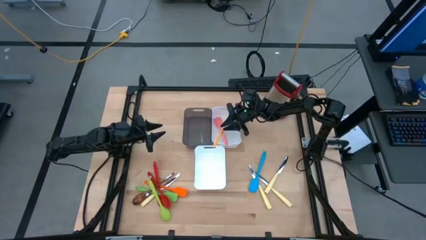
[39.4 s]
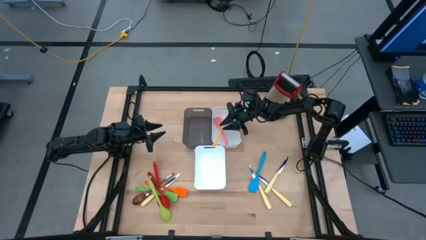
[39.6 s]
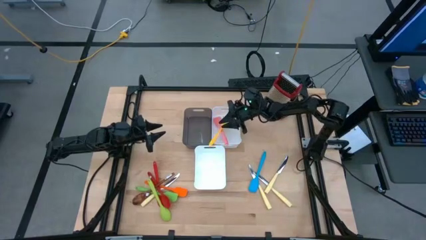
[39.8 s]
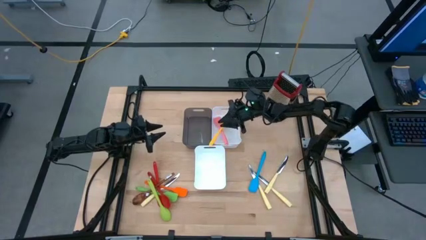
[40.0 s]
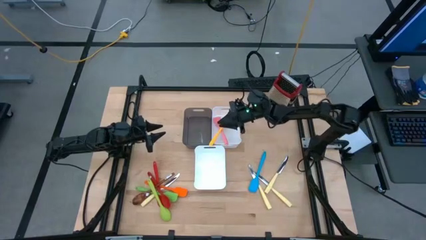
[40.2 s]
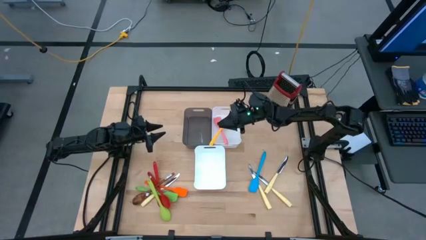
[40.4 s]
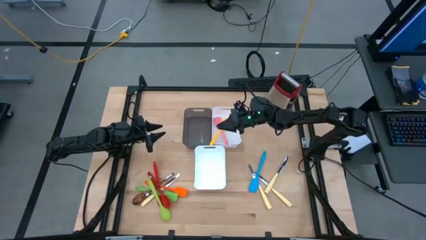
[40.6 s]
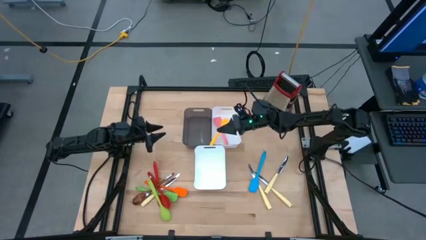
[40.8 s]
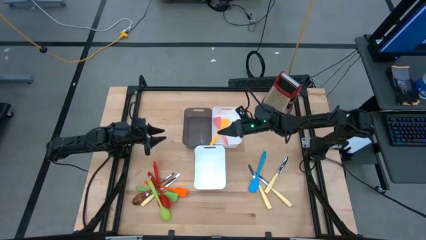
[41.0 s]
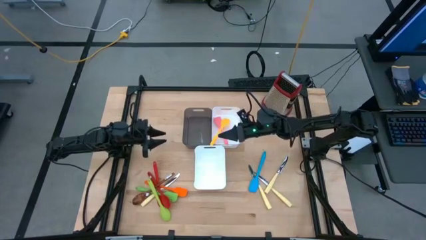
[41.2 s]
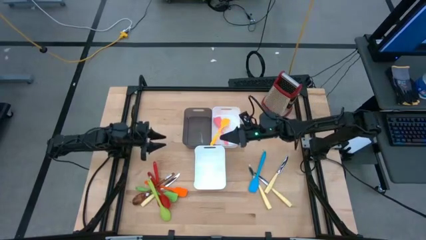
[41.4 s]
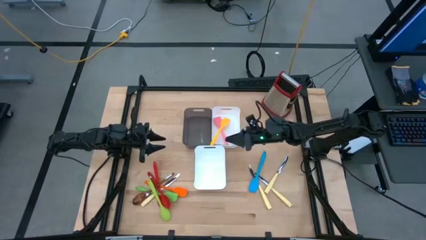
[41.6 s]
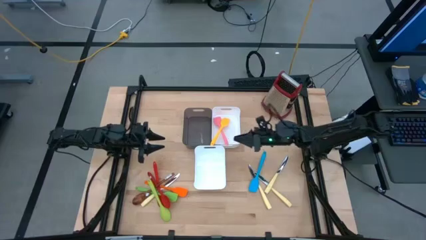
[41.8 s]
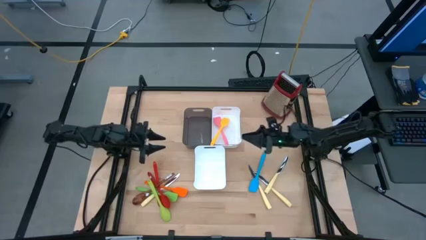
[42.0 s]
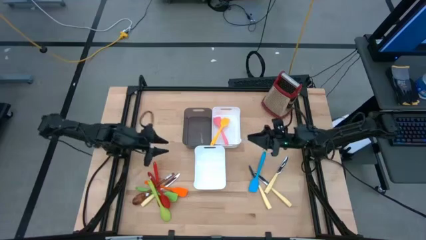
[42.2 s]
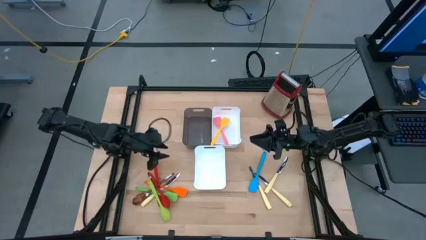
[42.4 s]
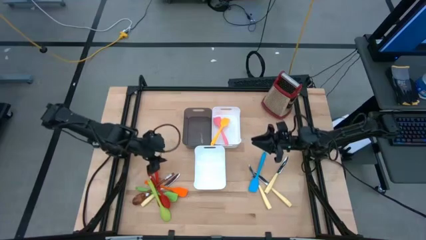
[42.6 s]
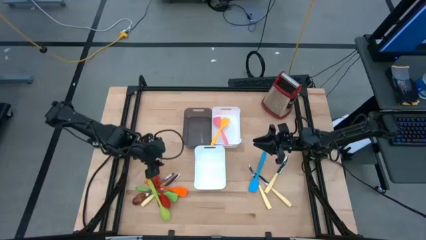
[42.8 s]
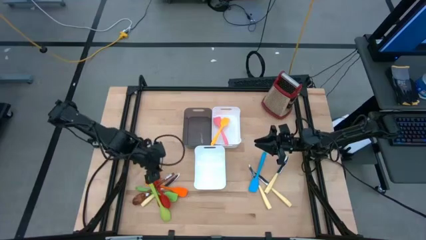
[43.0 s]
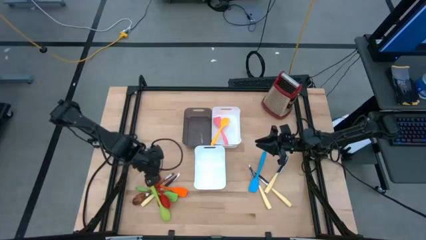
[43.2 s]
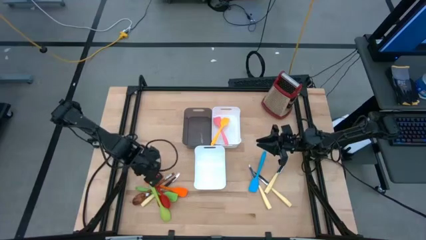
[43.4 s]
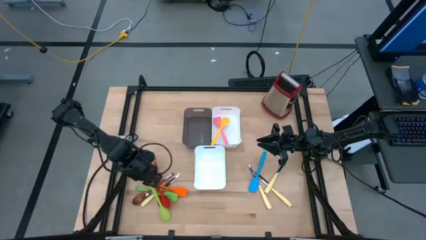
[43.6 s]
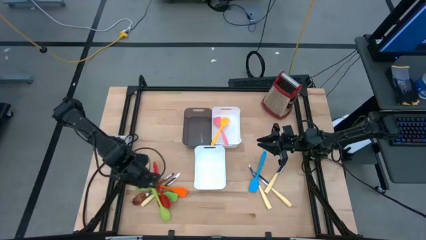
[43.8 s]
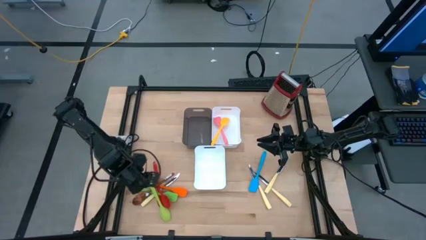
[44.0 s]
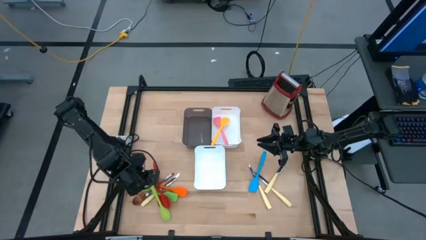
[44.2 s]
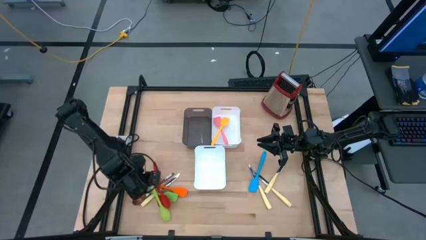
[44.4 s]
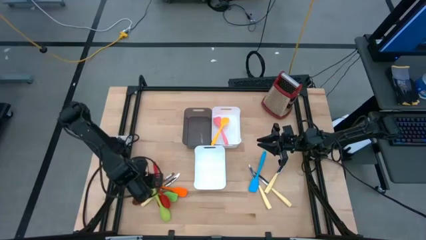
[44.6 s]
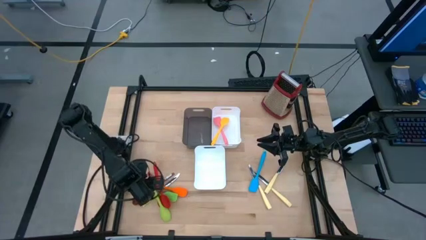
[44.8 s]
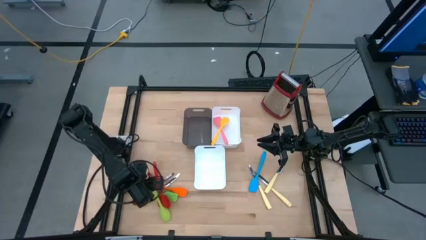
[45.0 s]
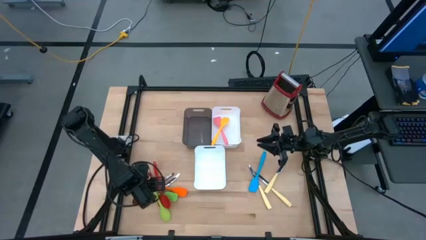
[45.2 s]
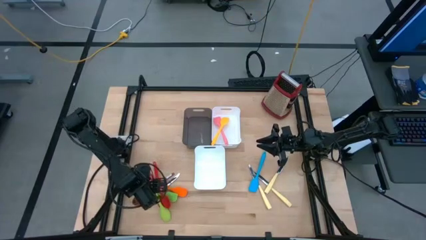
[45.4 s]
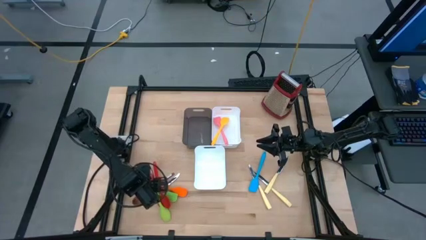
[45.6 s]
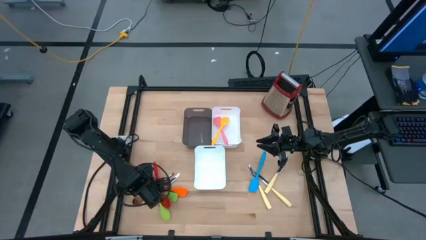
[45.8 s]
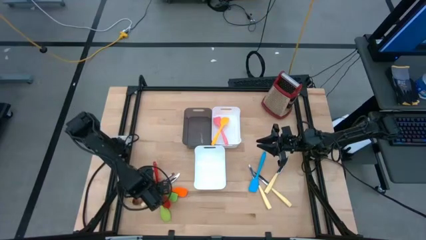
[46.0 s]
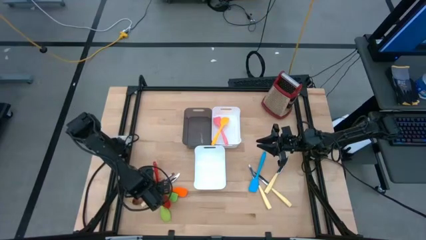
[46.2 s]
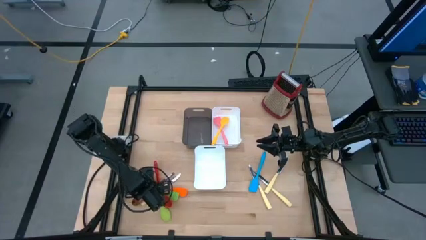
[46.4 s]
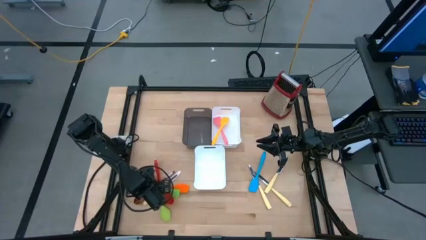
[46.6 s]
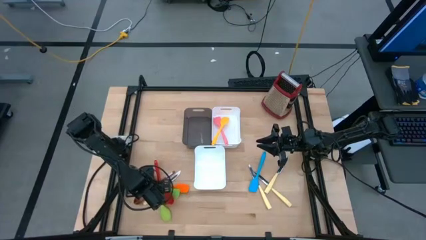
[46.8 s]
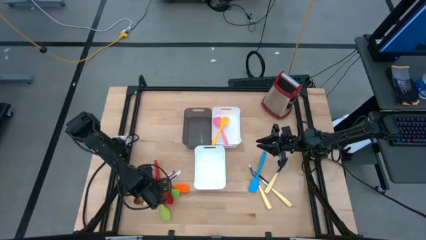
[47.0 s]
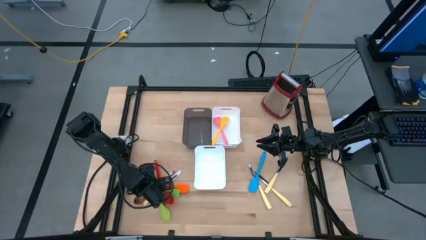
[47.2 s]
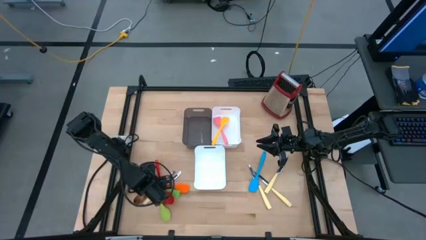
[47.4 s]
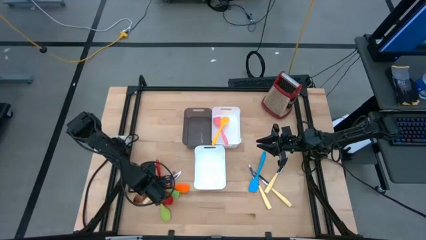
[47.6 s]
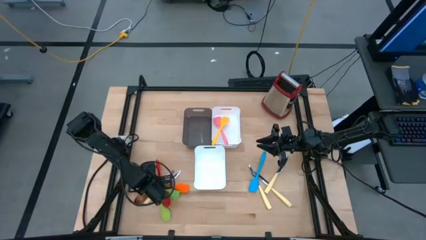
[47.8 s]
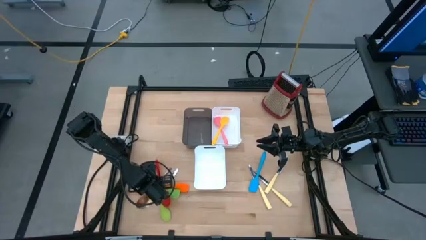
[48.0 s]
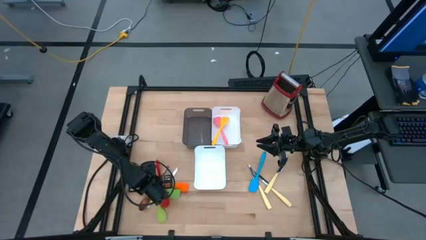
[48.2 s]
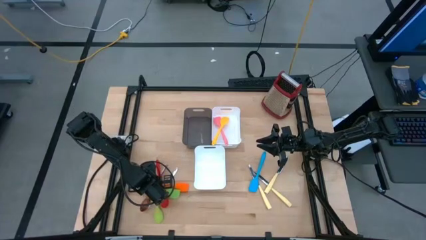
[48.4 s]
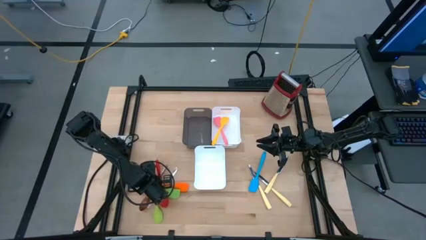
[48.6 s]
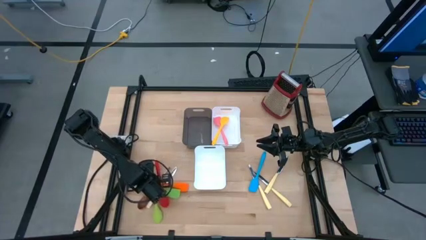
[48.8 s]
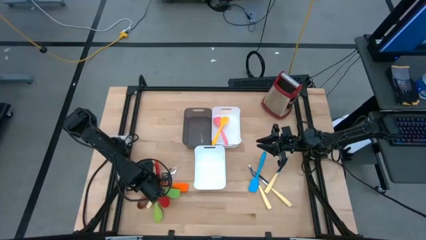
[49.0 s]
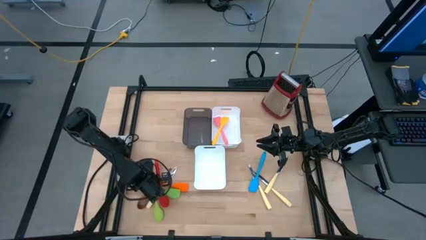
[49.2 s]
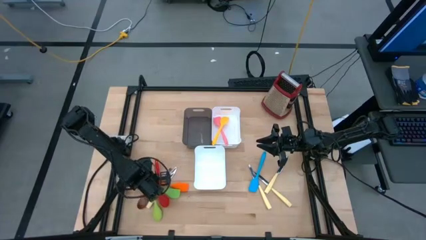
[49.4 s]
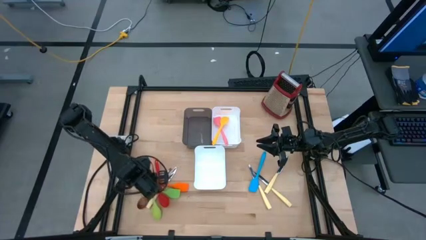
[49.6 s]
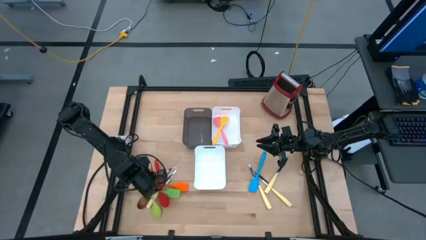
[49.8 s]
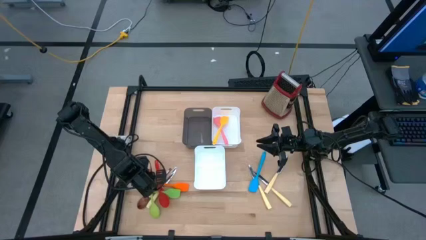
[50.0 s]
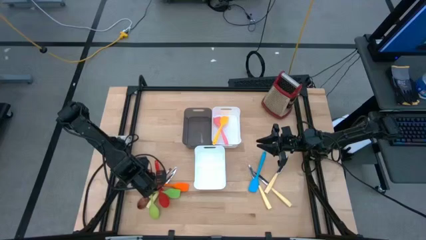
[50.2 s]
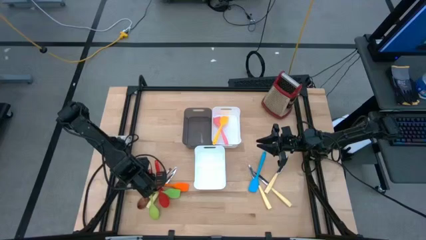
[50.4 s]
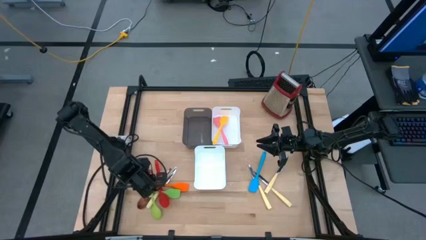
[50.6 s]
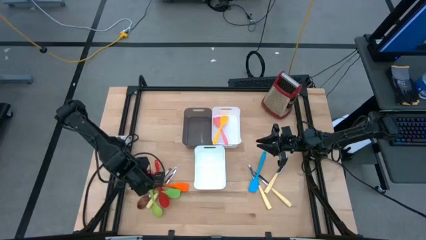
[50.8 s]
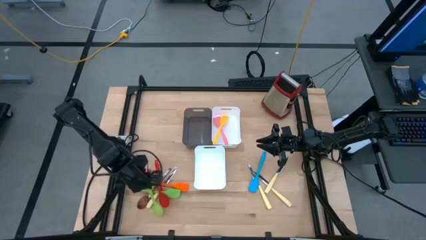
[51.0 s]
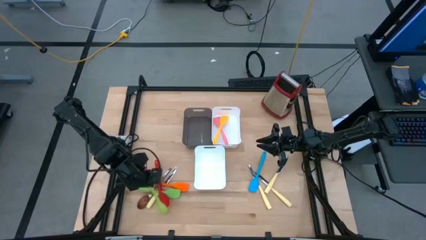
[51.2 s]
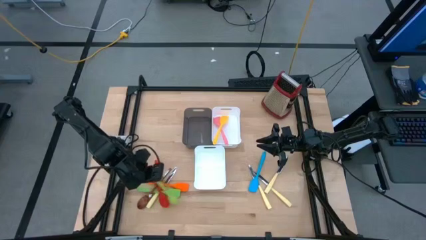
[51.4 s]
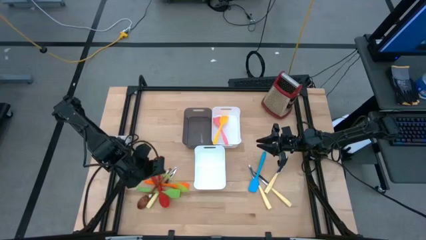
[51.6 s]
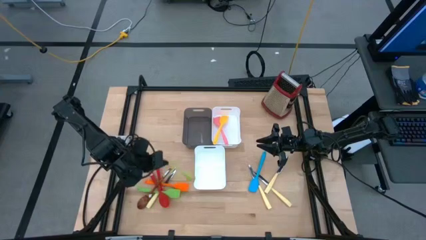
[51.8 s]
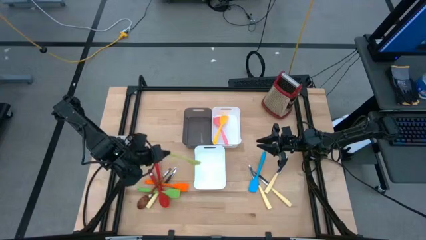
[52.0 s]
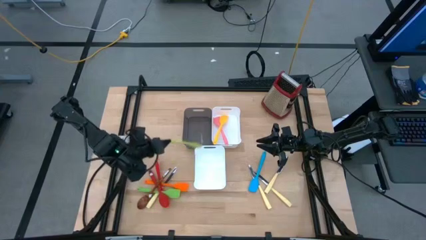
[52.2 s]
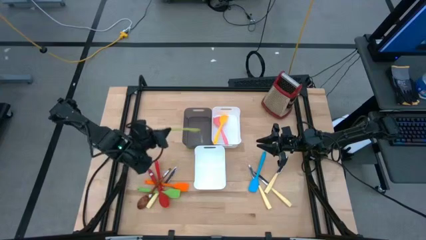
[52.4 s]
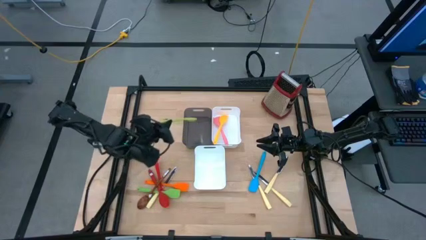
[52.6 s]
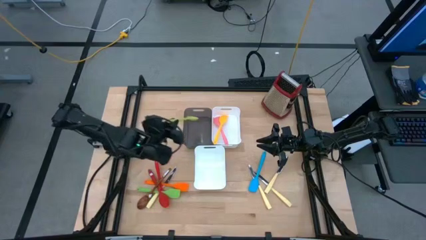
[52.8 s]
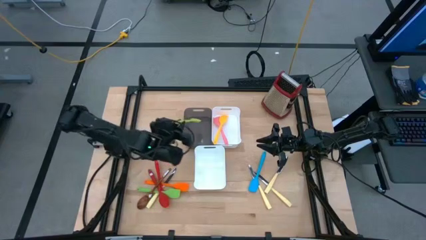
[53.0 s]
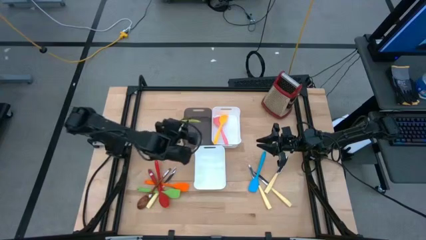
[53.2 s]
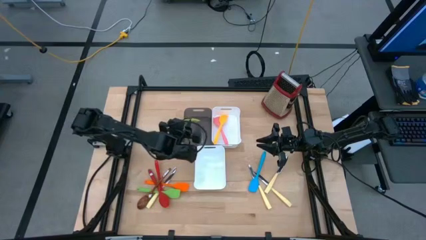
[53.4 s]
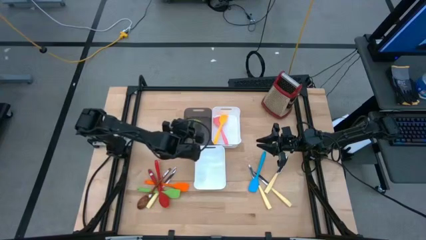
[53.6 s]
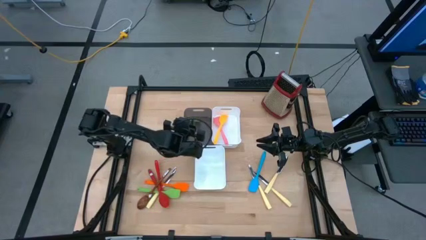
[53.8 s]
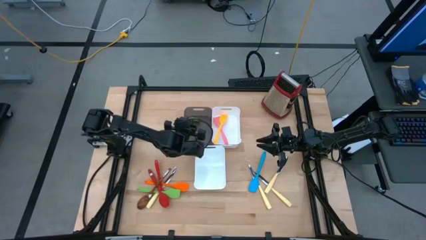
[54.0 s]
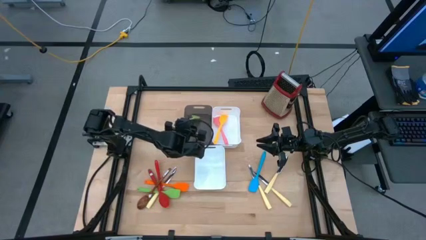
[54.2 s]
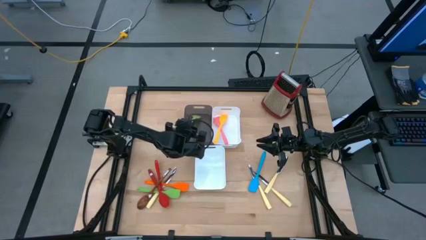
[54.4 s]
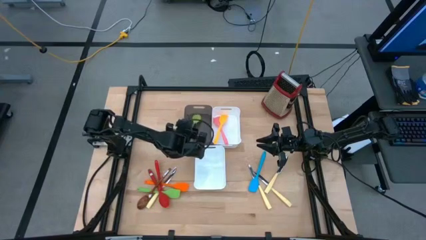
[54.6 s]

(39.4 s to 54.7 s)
Task: Pick & Place Kitchen Items
Put the green serving spoon into the black bin
